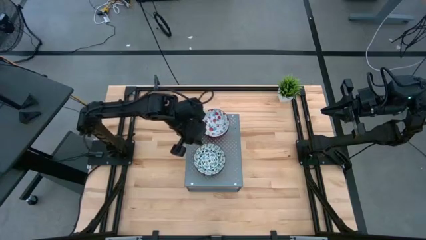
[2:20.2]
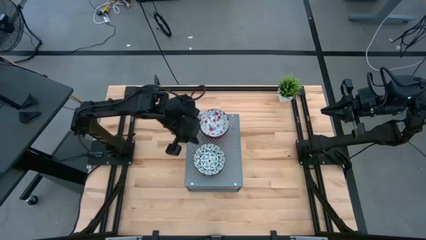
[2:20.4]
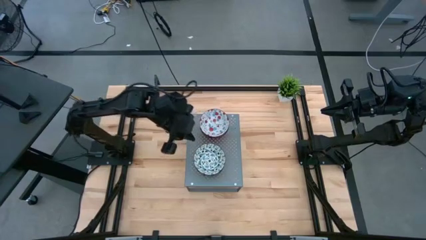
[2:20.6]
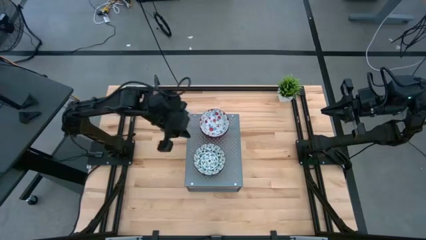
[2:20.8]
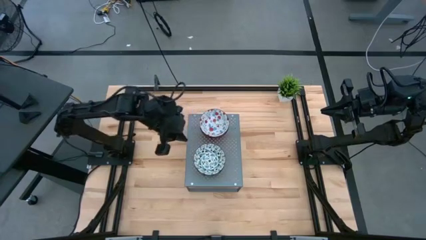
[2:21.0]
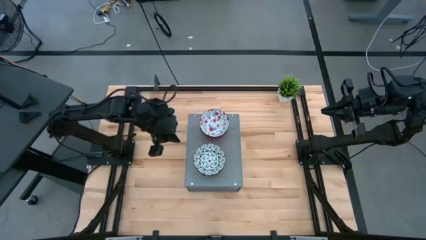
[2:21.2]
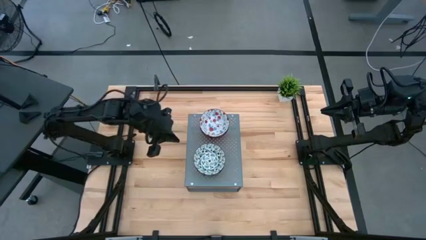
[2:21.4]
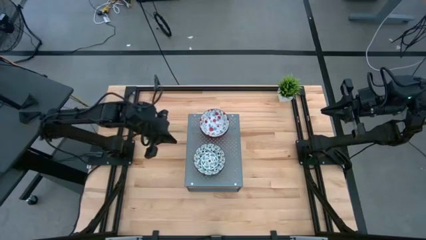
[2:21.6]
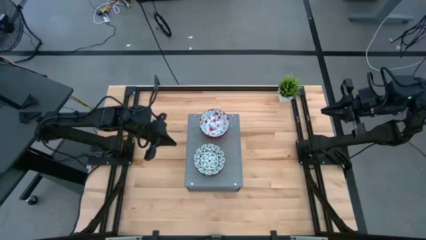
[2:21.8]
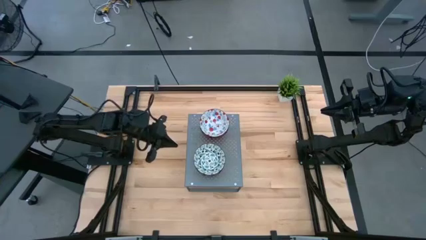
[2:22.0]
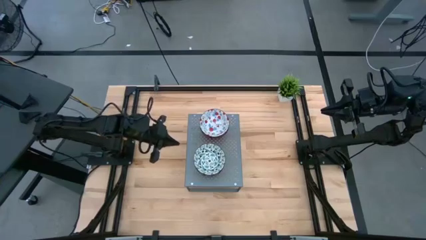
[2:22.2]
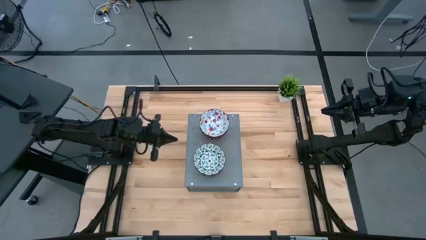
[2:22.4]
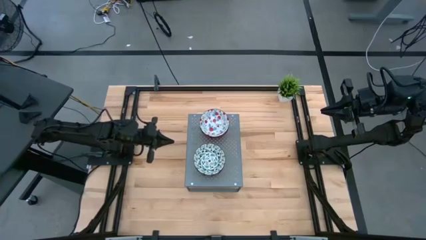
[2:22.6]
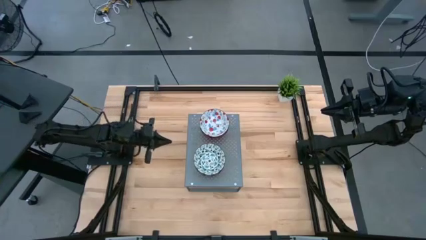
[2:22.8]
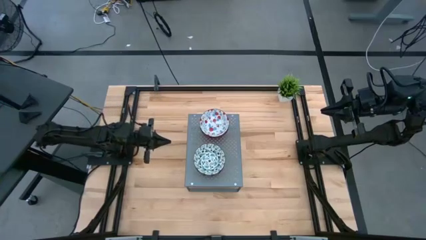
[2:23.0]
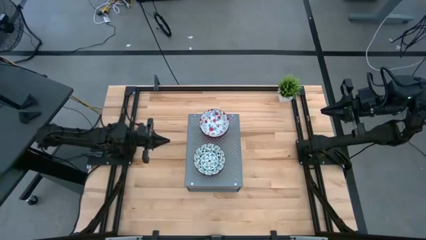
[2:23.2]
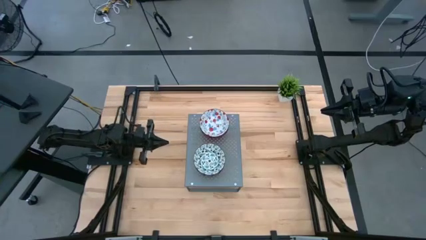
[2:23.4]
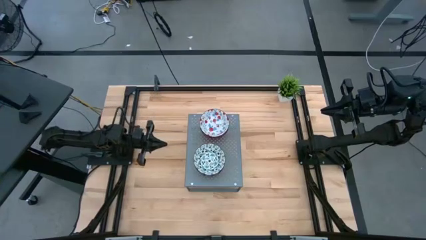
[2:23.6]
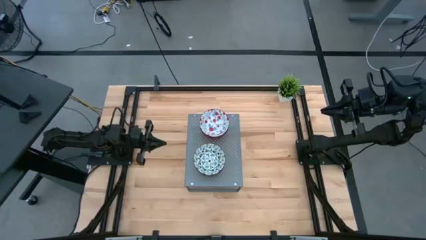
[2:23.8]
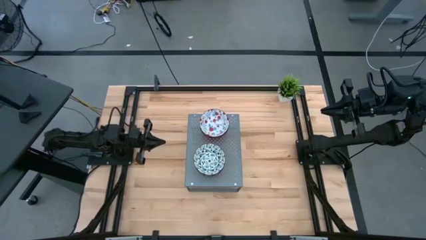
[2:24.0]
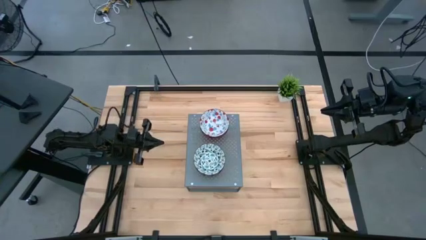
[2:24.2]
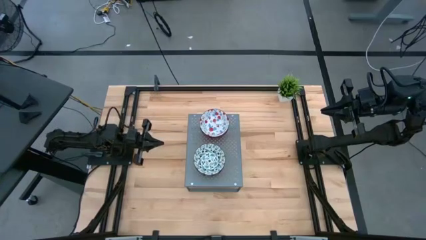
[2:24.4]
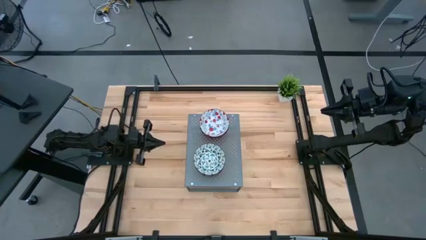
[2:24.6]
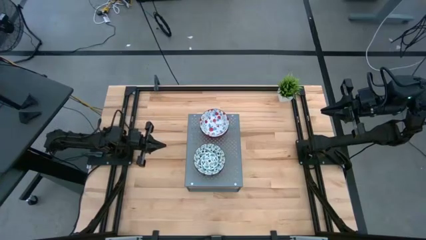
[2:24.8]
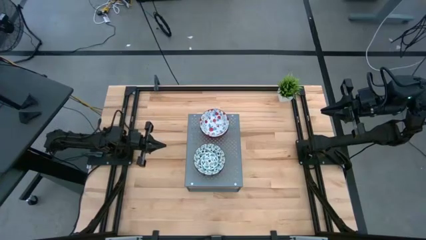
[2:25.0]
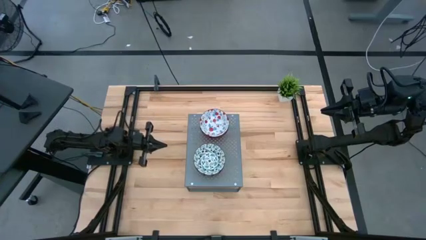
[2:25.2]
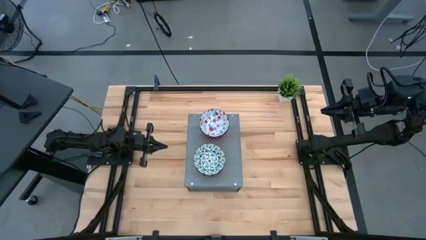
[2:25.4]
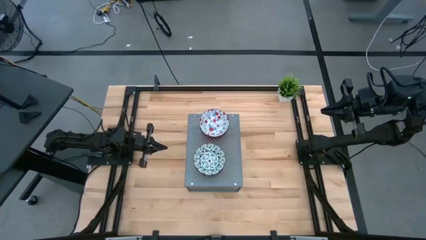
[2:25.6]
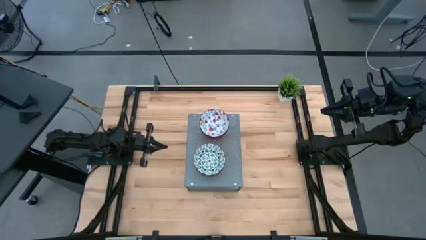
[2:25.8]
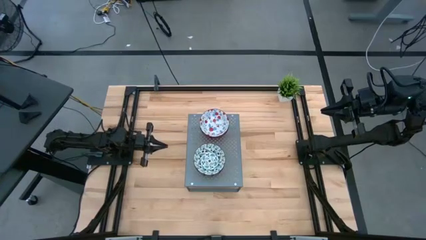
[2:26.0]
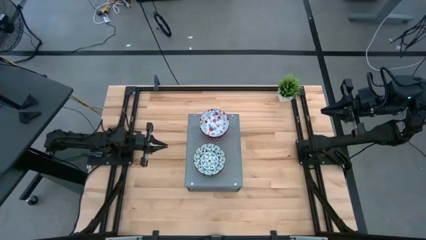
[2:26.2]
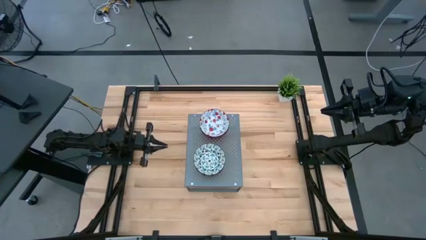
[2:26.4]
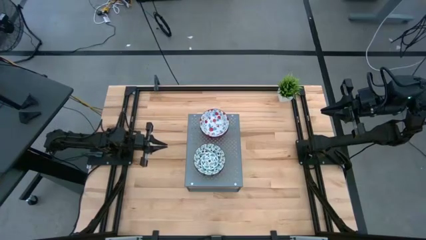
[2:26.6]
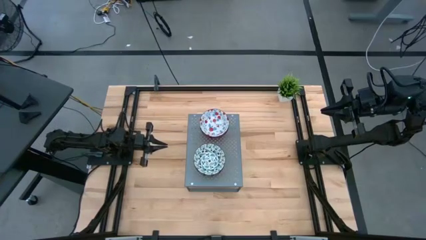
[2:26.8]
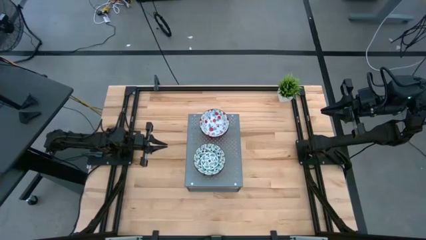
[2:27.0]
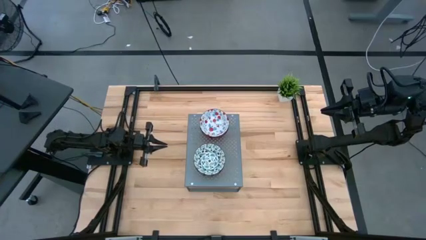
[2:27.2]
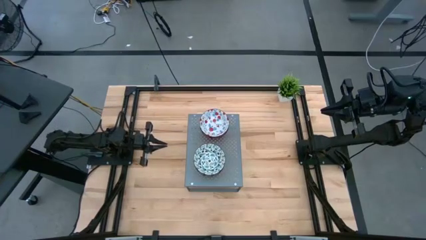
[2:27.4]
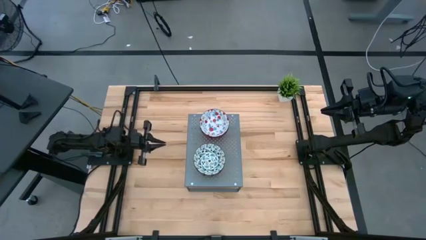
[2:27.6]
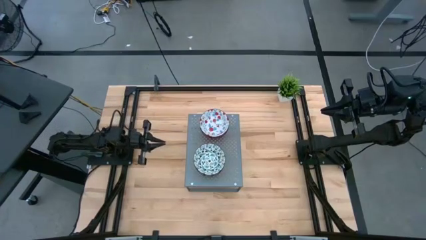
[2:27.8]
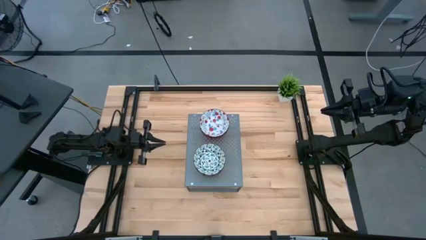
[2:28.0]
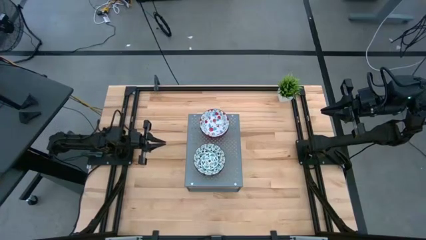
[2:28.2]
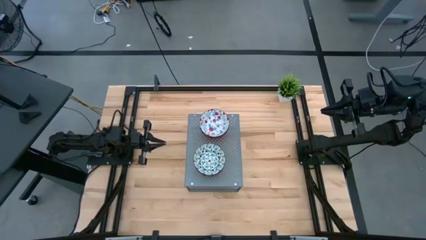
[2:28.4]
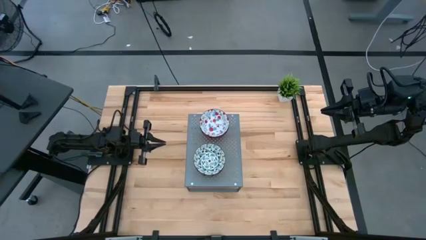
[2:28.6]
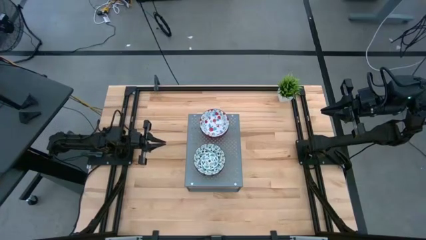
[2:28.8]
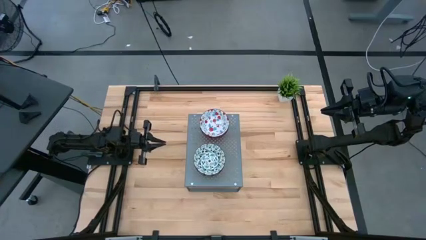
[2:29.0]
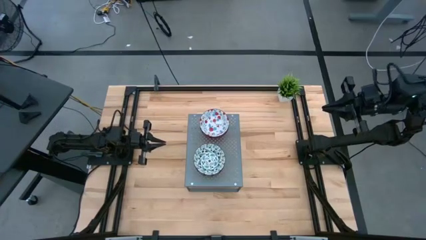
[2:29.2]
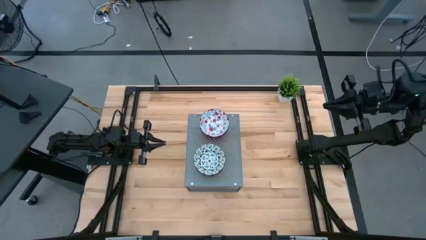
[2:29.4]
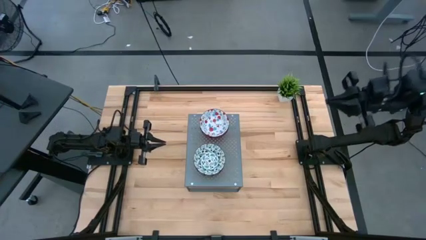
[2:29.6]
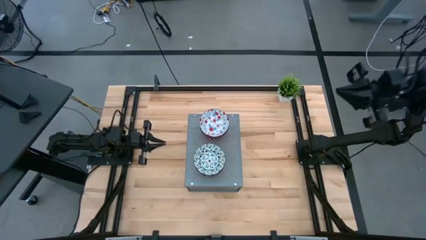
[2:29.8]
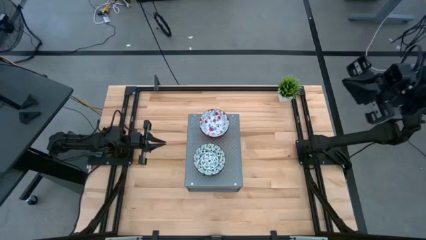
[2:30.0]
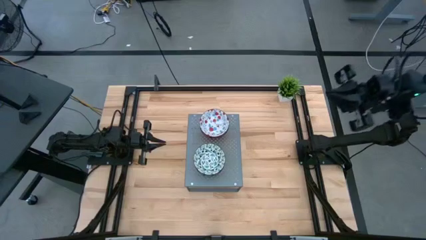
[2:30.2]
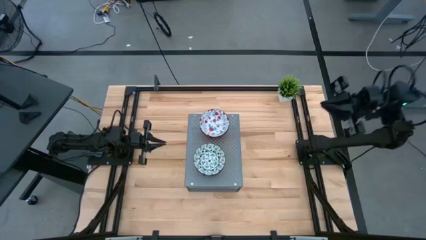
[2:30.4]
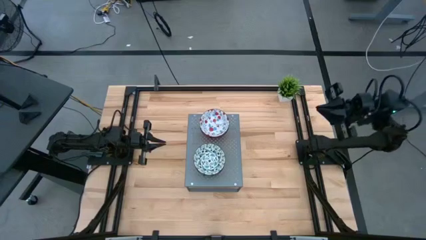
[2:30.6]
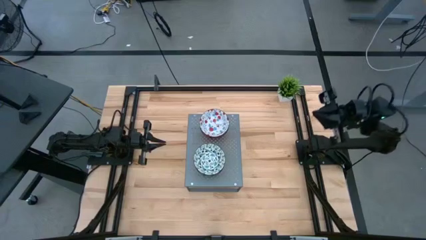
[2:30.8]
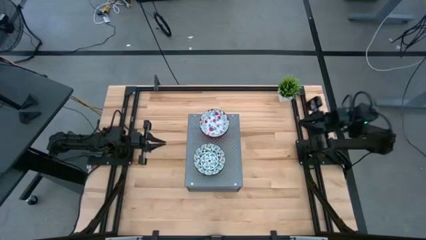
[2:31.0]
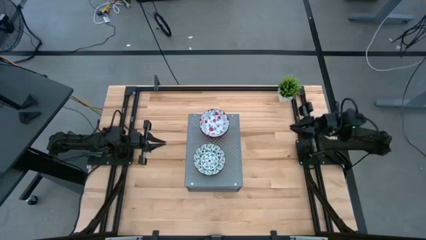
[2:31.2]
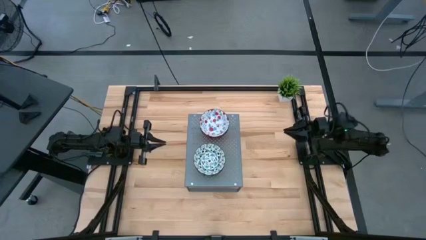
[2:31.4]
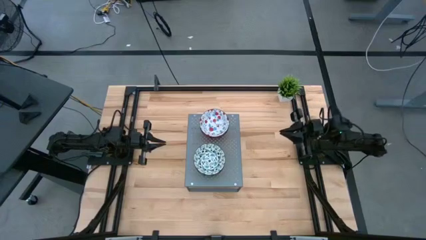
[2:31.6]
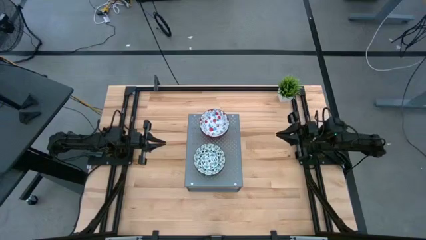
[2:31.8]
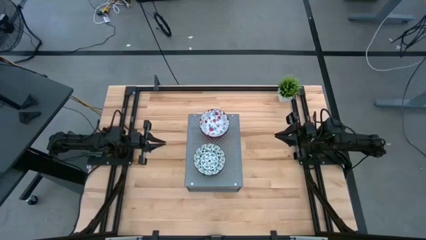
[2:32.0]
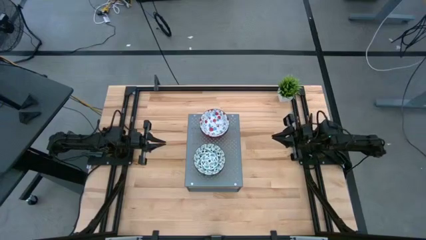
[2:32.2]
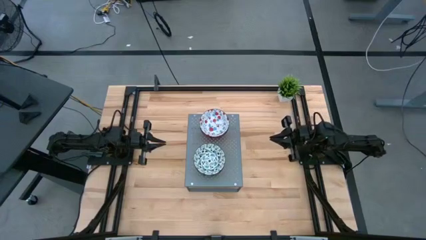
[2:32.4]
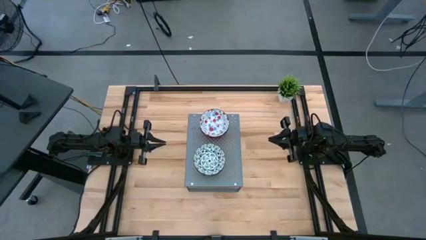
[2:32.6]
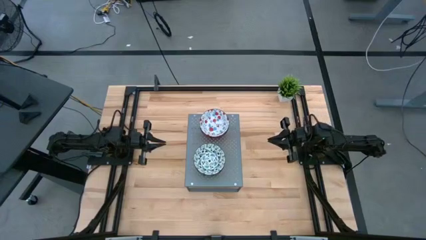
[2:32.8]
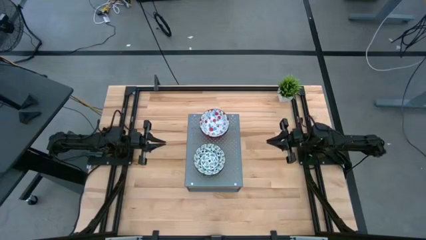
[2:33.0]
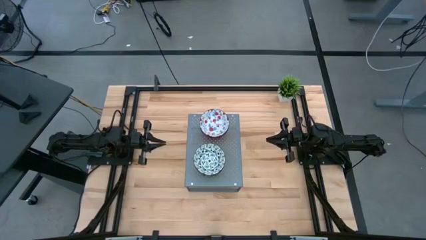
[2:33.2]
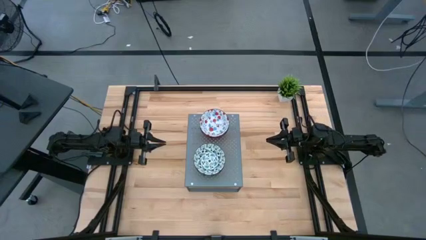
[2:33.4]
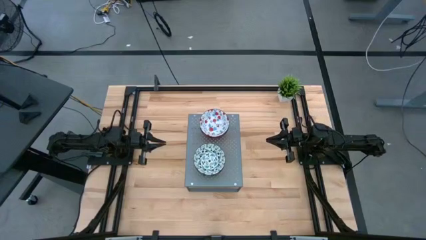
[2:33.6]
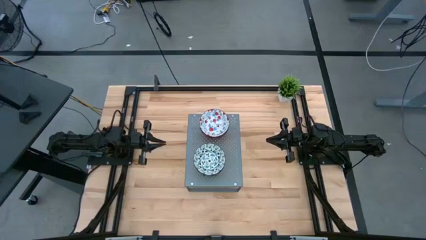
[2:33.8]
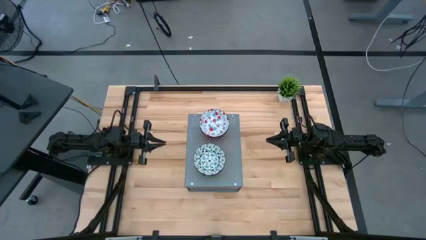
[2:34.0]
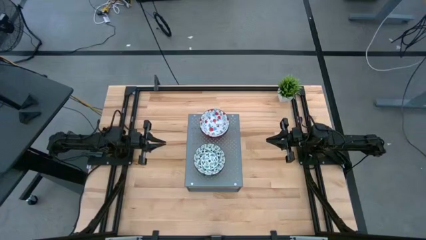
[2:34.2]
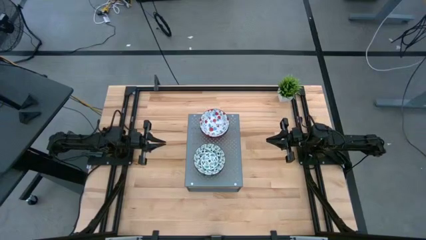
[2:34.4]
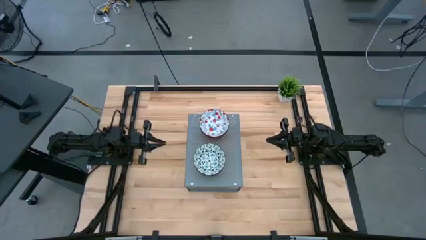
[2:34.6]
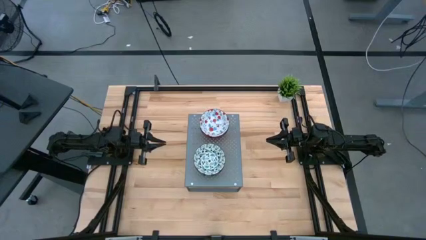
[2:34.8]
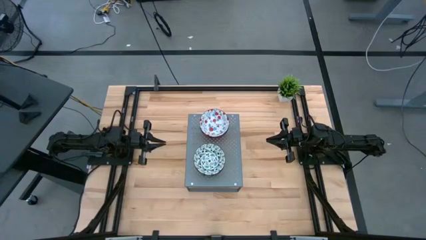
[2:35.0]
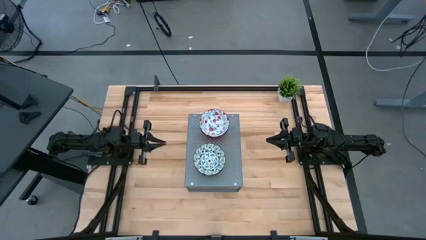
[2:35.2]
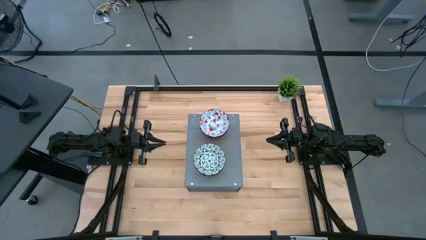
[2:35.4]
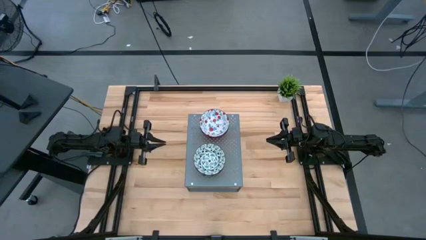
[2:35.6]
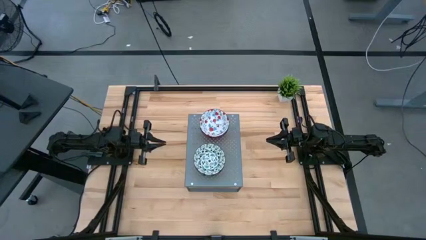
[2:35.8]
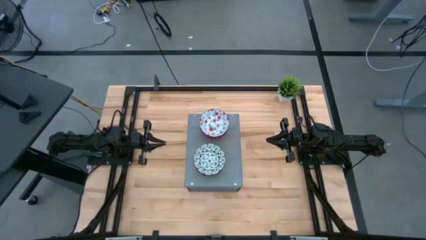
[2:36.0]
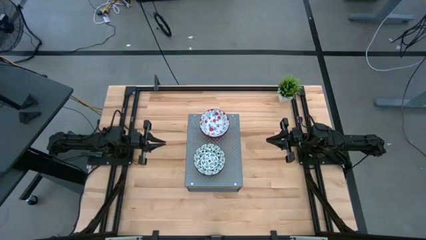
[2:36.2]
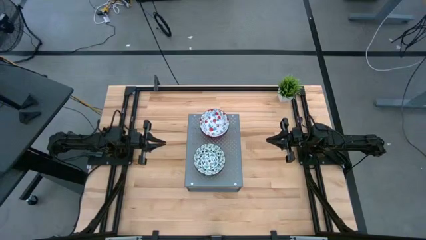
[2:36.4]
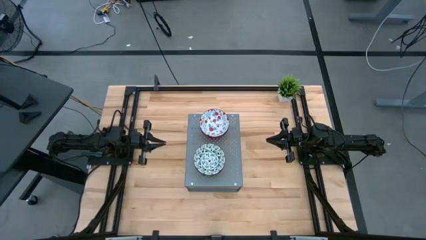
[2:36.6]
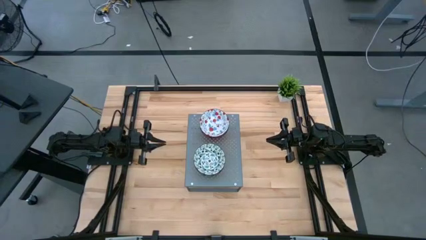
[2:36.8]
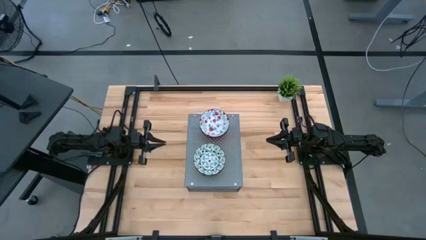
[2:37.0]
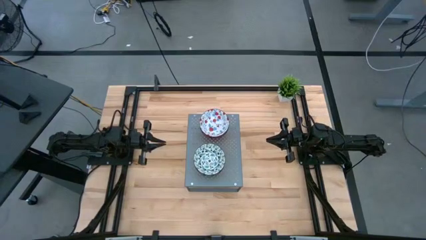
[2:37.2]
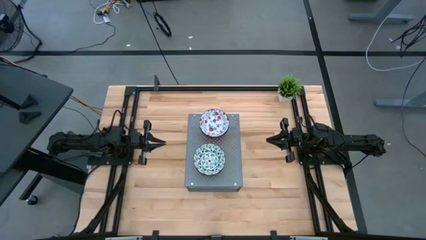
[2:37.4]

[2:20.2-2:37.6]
Task: Pick & Place Mini bowls
Return to Home Position
